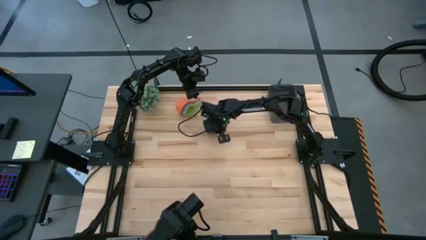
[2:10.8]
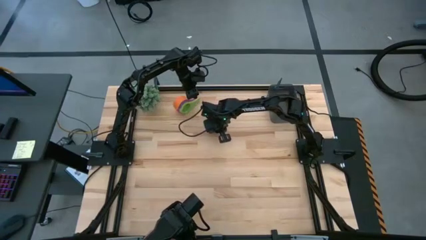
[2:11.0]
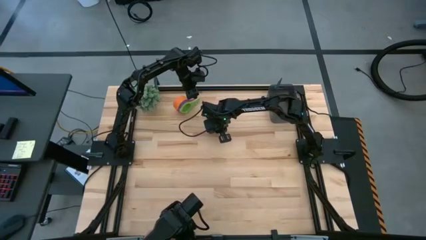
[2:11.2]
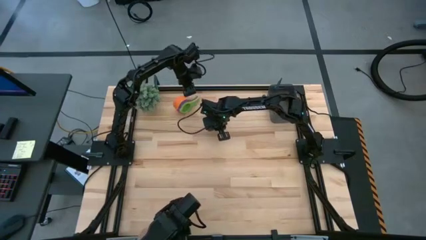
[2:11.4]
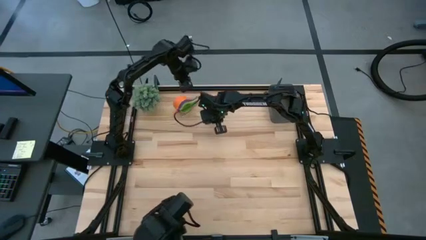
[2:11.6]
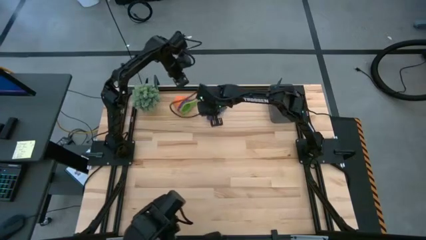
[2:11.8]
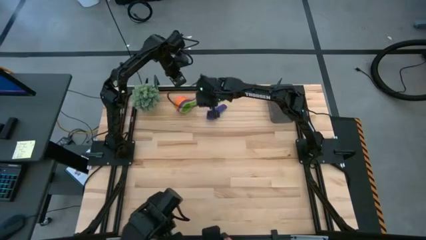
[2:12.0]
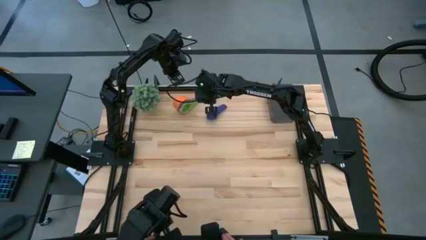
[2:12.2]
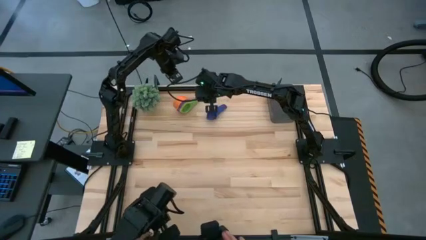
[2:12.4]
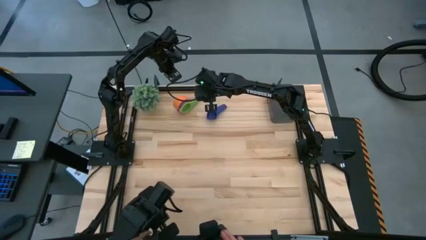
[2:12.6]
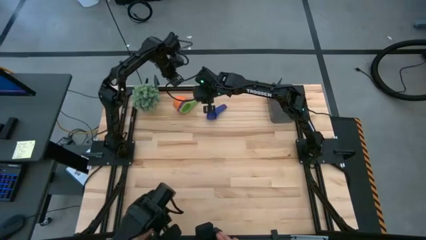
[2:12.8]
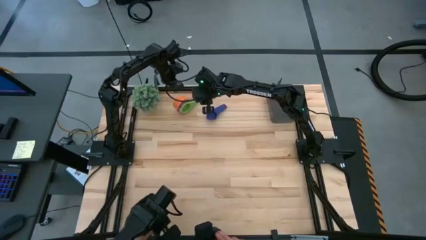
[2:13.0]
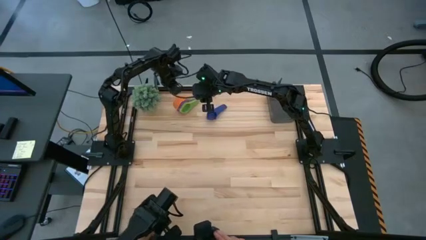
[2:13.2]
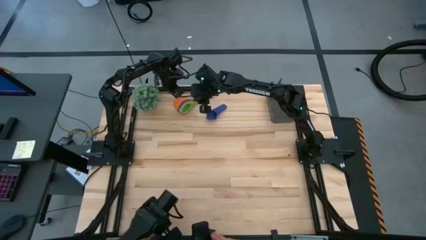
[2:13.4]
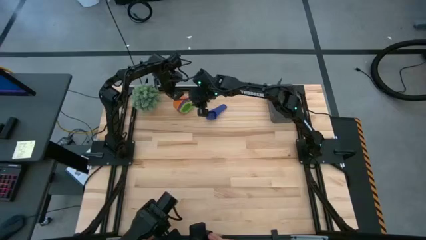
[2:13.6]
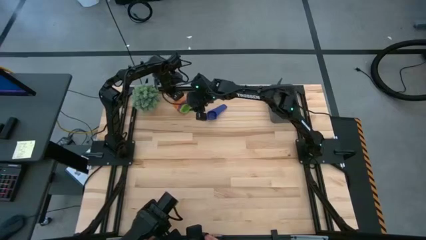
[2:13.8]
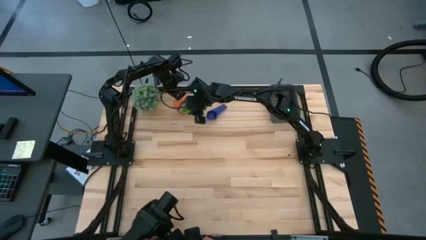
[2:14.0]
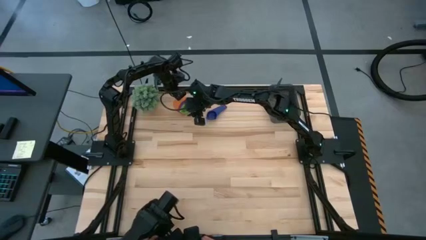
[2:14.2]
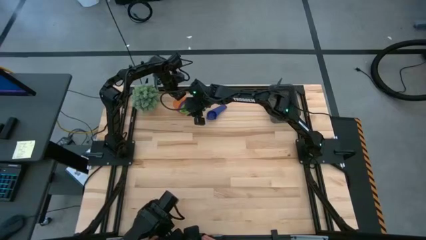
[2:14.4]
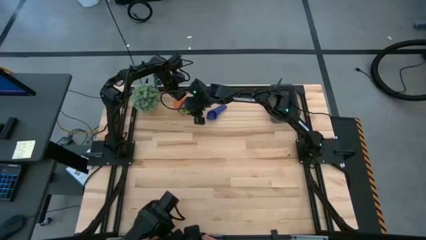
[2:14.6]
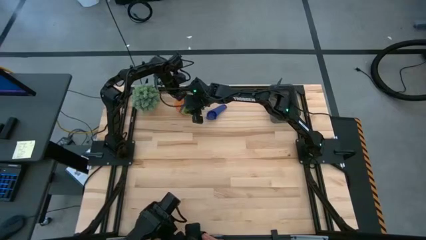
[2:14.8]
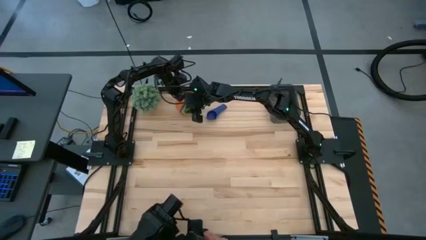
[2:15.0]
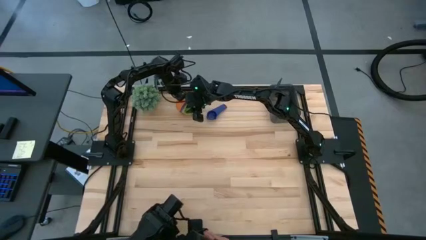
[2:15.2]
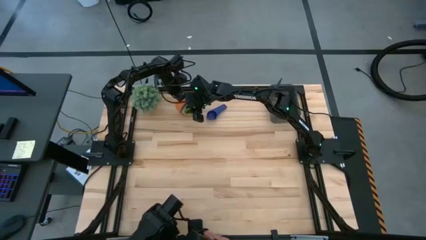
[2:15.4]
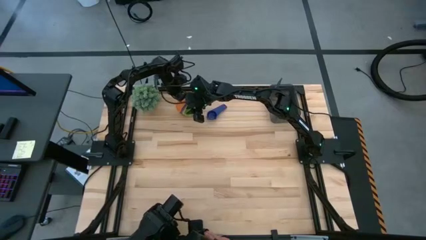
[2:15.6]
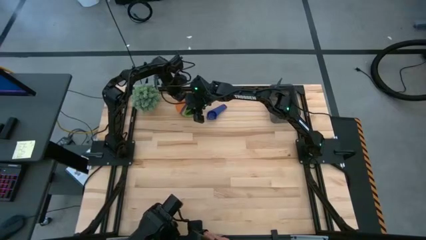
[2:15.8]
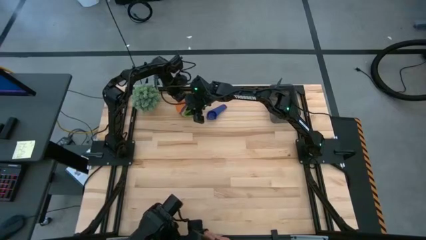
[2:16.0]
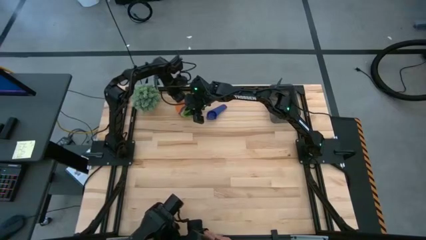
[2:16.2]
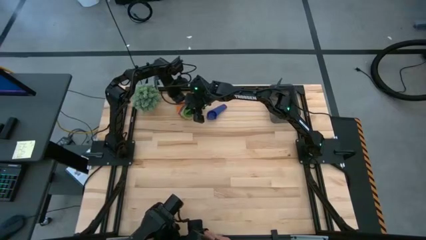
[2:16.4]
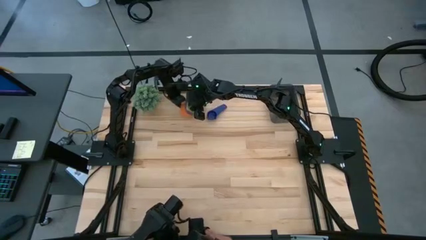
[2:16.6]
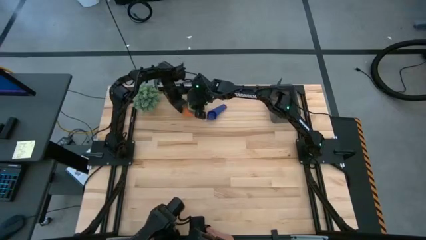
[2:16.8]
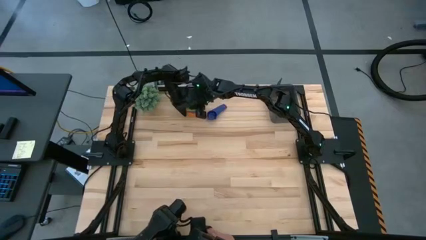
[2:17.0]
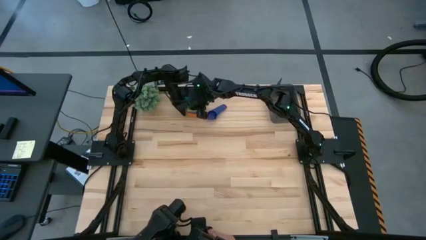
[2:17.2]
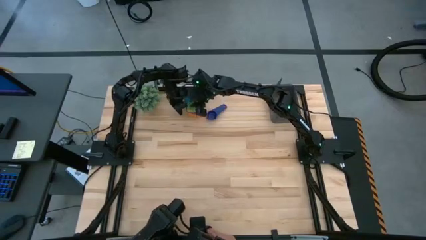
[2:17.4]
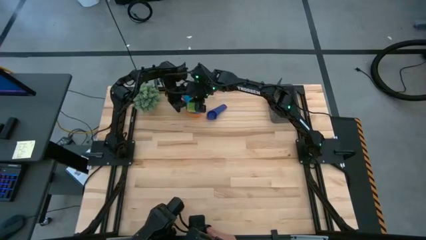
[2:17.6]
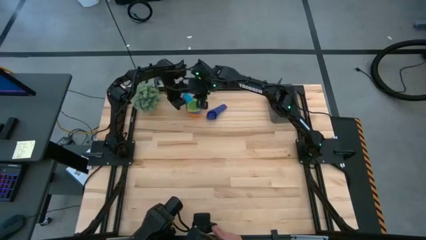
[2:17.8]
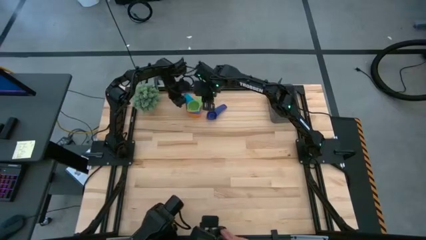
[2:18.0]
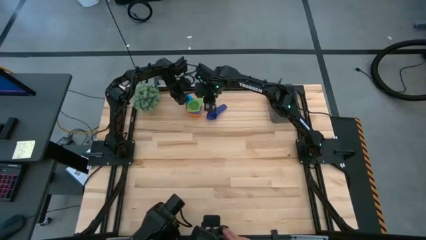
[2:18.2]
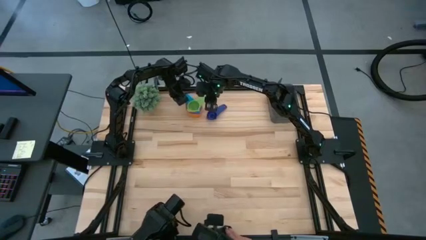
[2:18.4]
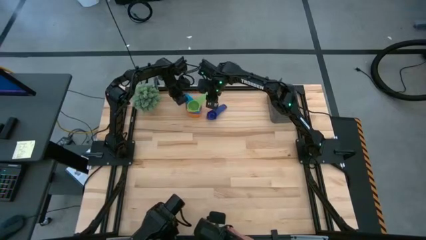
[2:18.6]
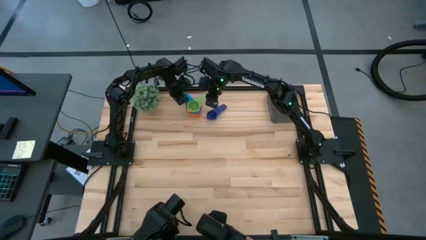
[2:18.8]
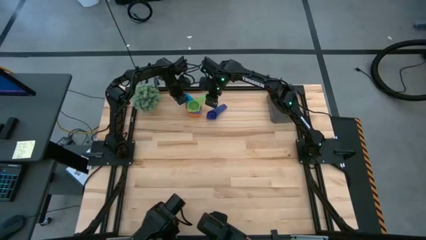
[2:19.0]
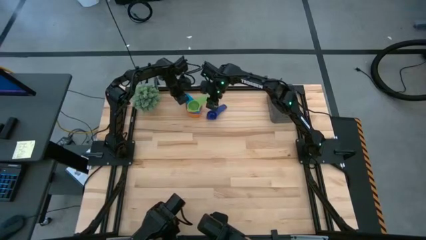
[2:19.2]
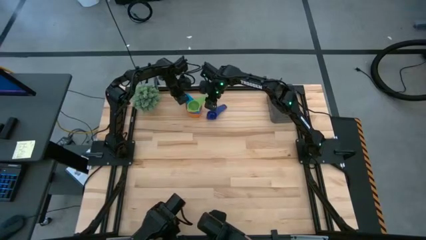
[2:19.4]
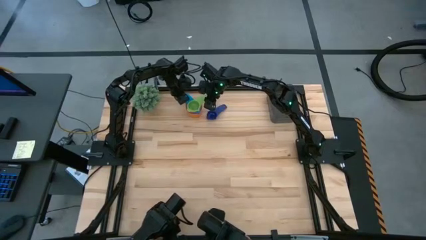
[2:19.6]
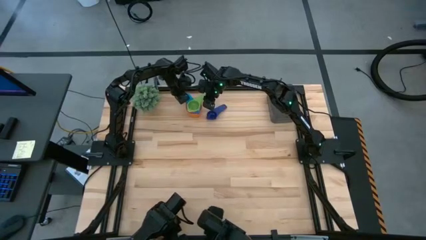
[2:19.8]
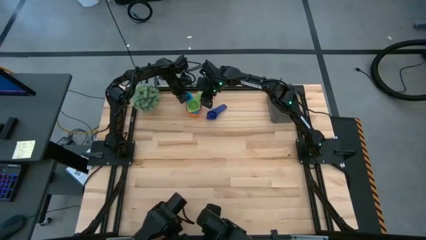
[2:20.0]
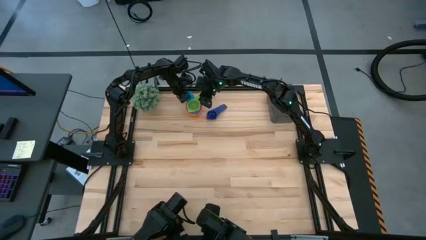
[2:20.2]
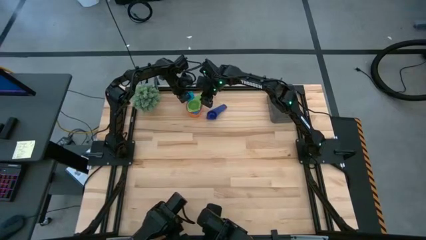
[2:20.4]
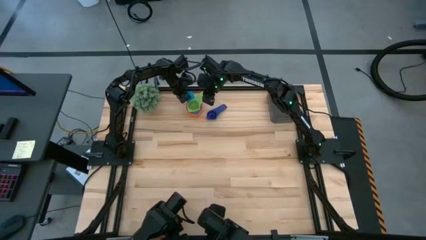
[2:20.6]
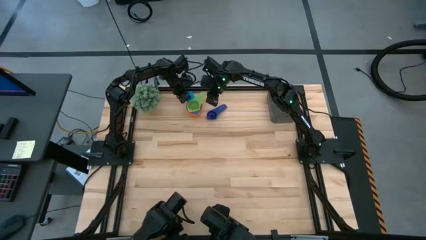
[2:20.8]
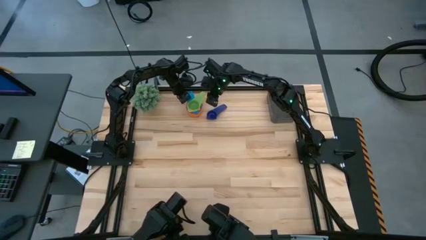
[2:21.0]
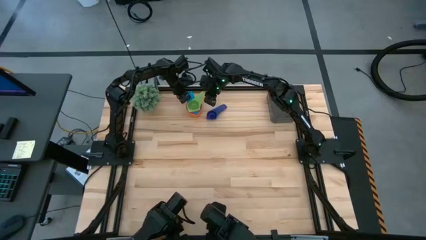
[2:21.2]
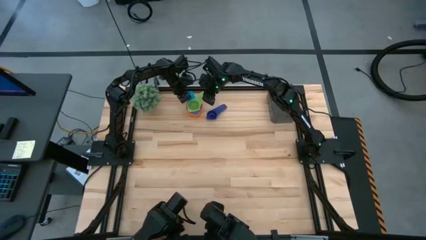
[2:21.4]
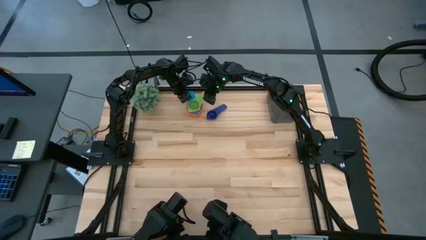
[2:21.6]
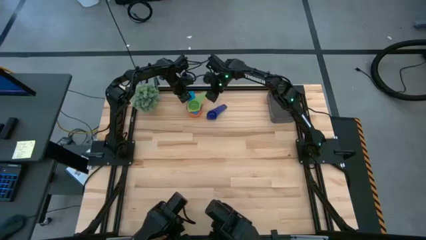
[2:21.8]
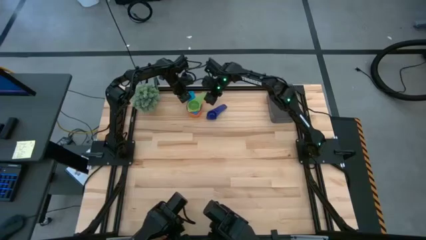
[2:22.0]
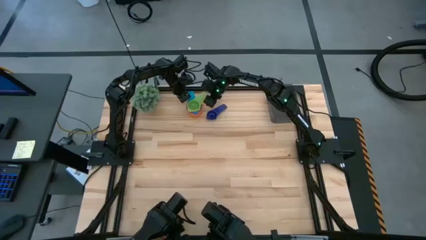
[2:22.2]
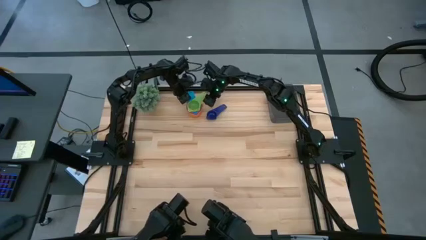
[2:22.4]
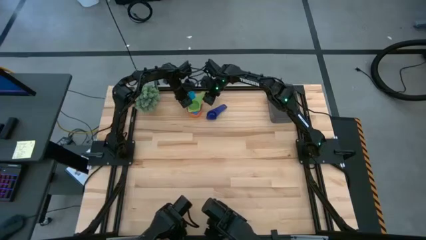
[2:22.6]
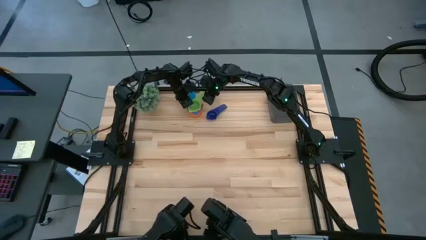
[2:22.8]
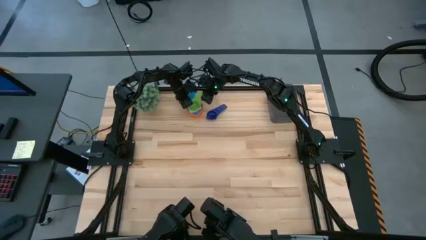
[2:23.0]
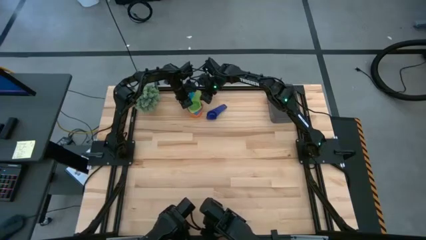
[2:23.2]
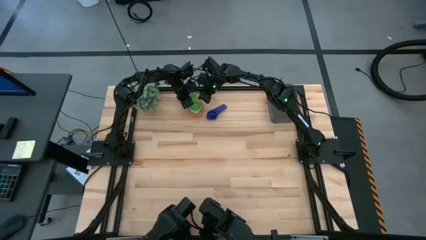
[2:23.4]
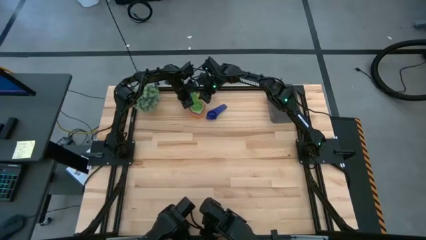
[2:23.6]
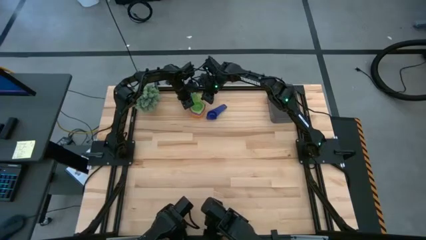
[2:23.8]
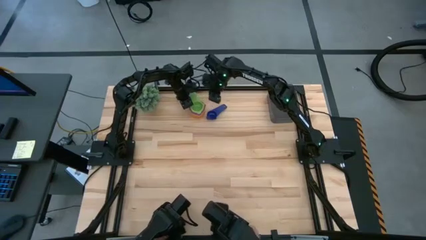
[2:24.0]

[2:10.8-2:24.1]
Task: Nest measuring cups in basket
Adjust the stacked measuring cups

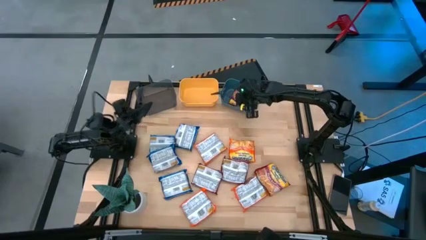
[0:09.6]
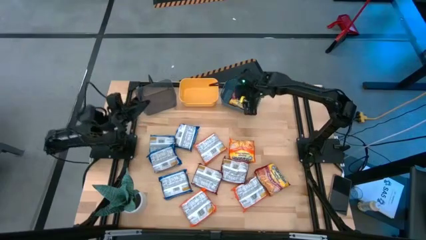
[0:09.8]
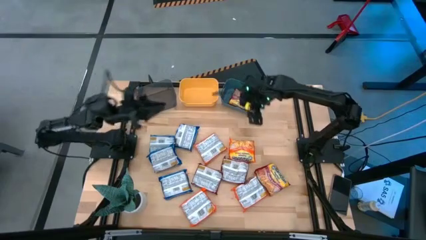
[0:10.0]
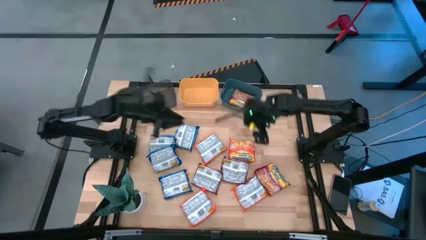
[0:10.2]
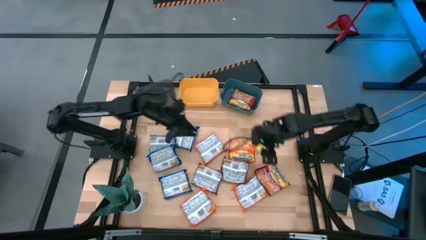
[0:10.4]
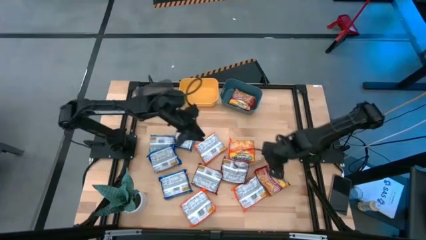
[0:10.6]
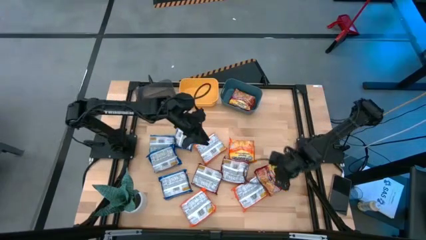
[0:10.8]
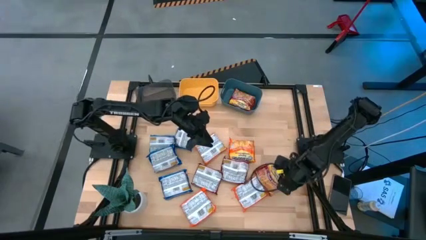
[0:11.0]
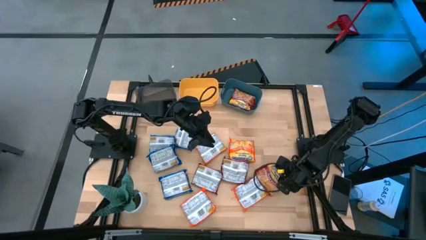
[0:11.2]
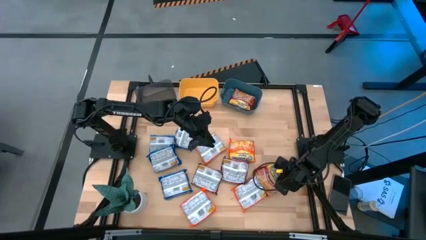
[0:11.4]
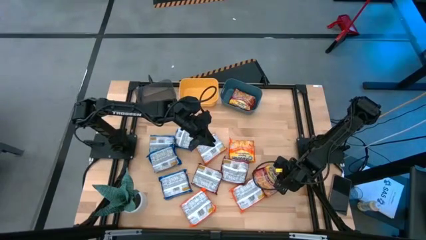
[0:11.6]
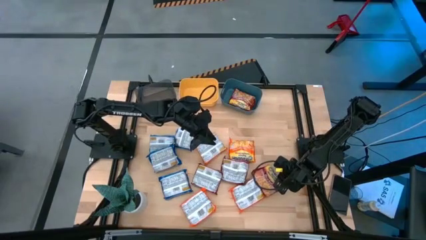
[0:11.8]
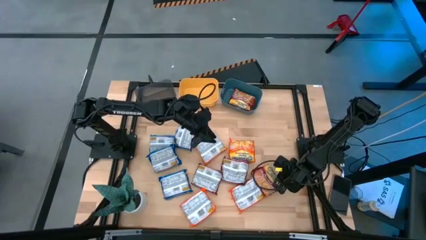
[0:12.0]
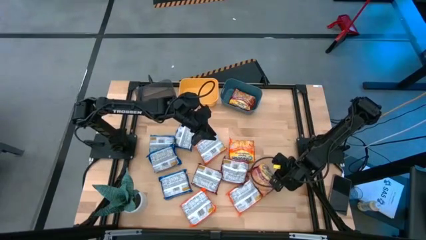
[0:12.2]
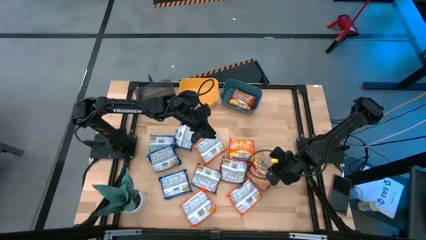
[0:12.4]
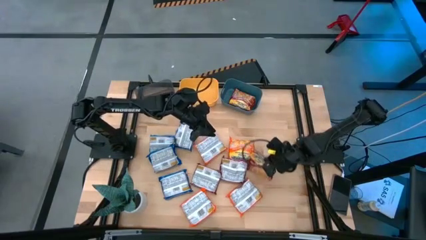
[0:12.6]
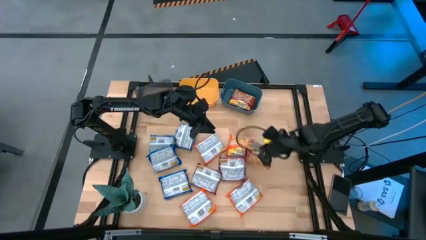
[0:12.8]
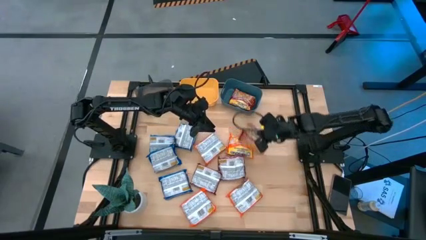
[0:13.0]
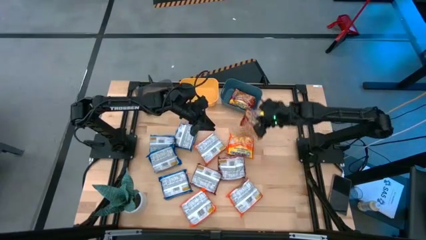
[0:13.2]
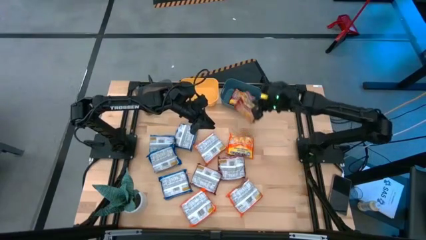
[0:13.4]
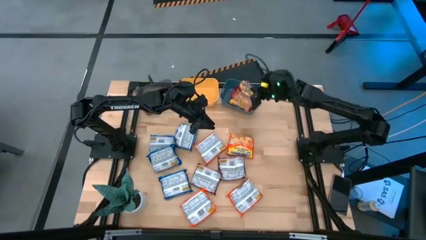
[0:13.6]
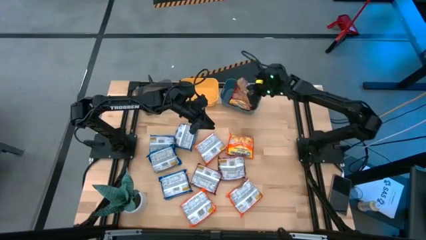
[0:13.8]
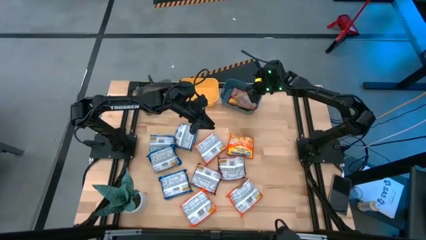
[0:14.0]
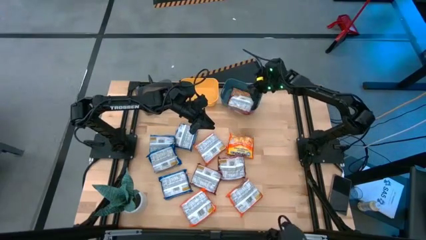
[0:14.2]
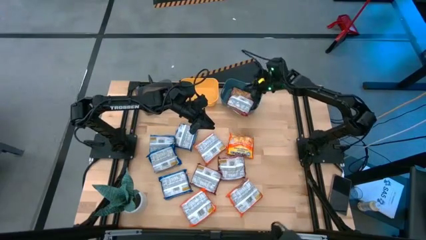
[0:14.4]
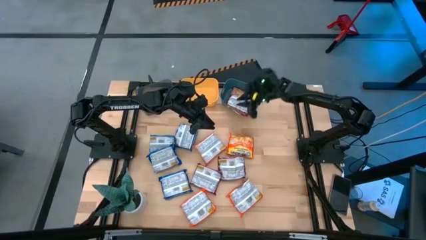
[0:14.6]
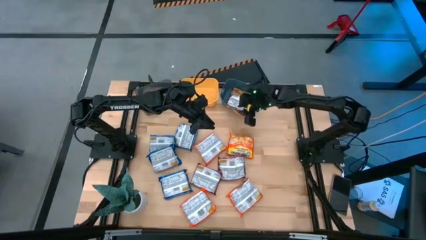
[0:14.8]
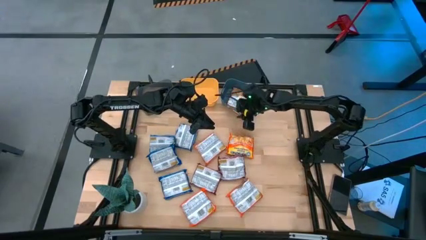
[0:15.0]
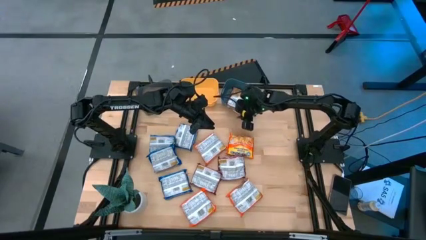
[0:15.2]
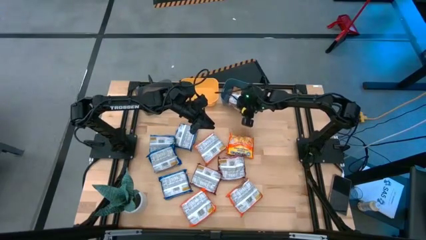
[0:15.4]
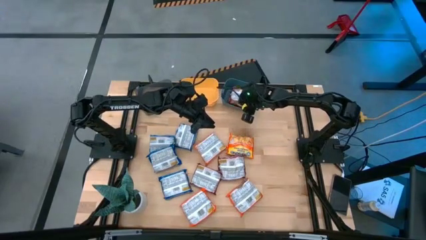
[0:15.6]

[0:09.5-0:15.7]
Task: Sort Maruchan noodles
Put the red noodle pack into the blue bin
